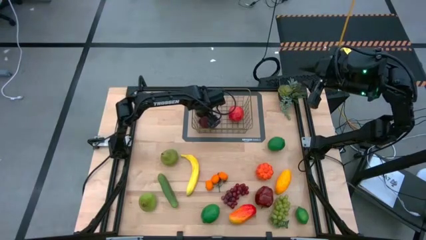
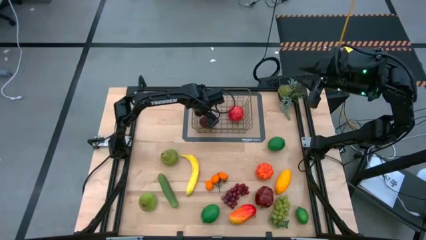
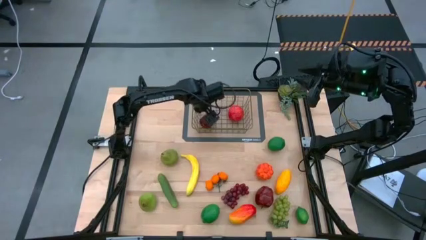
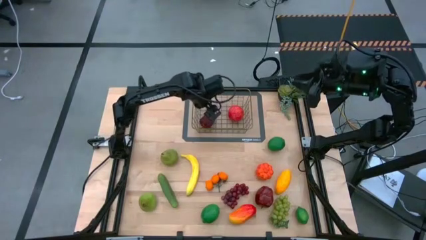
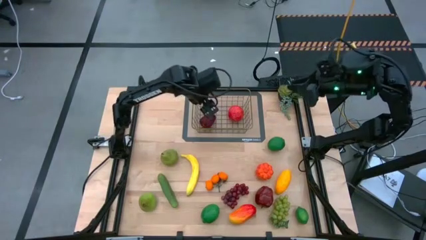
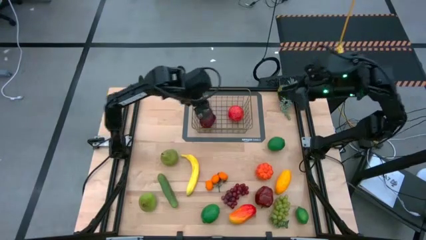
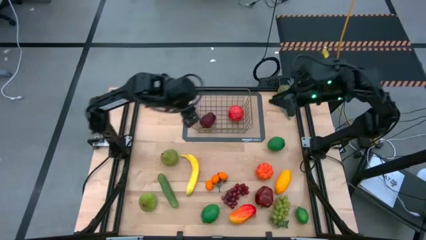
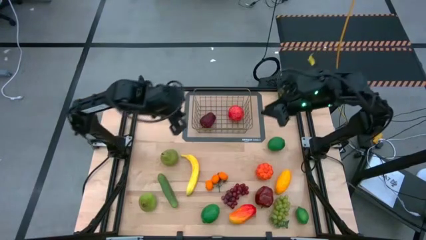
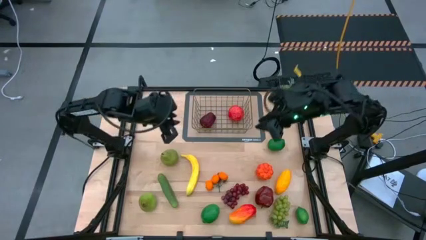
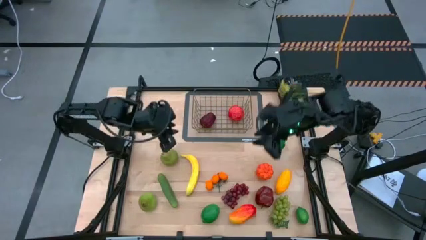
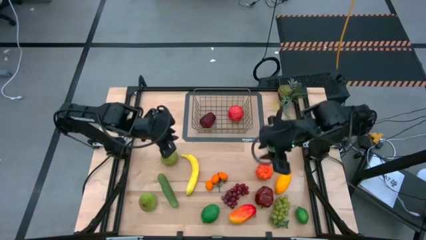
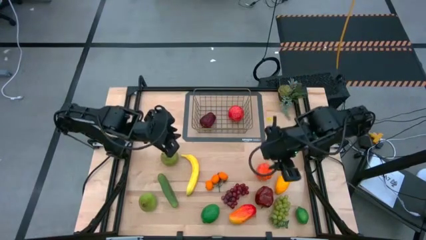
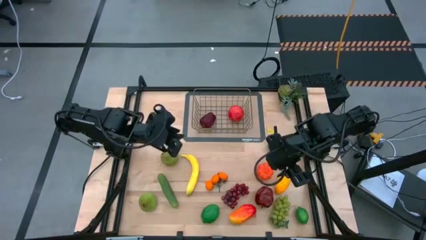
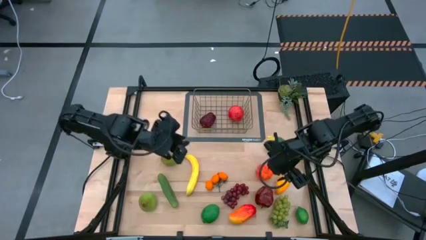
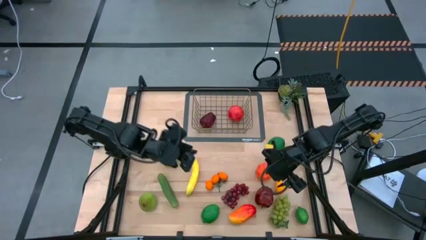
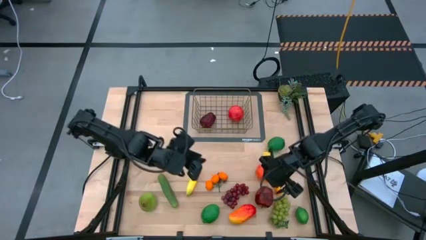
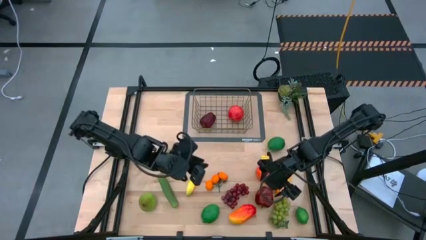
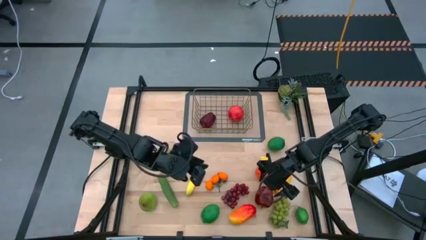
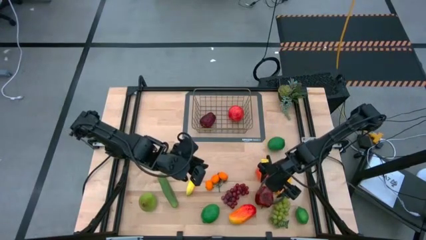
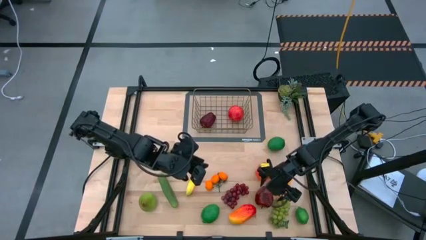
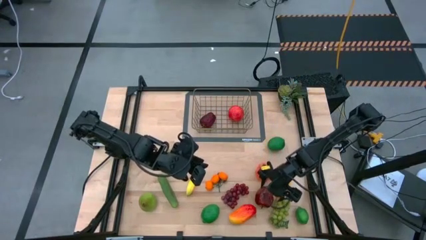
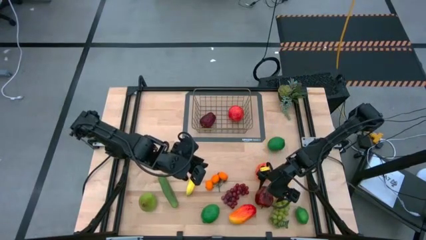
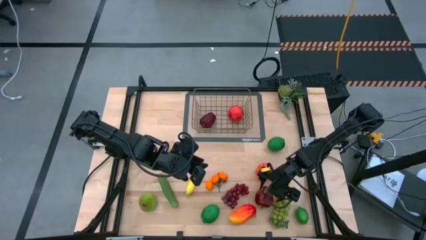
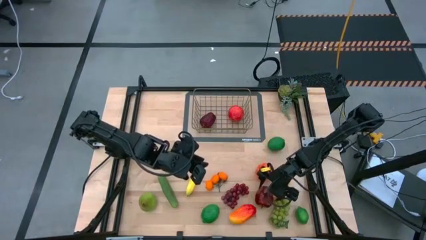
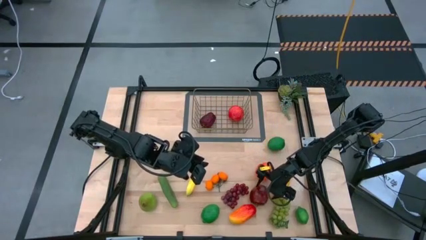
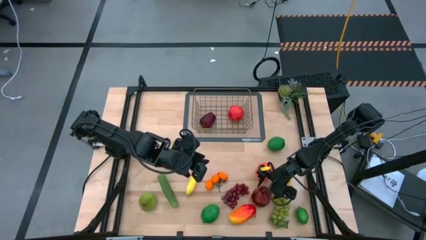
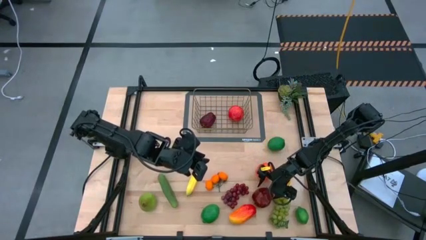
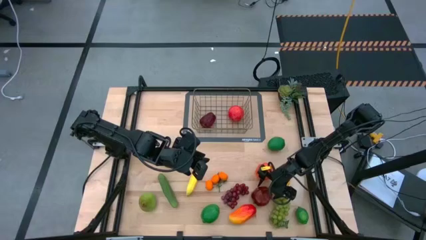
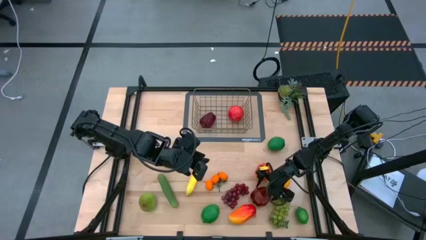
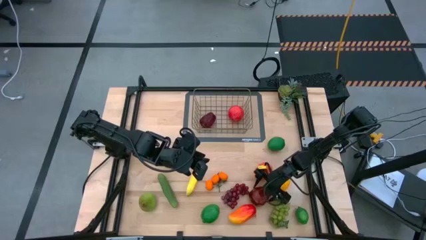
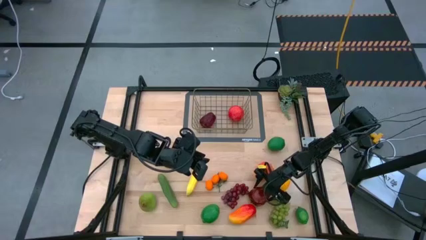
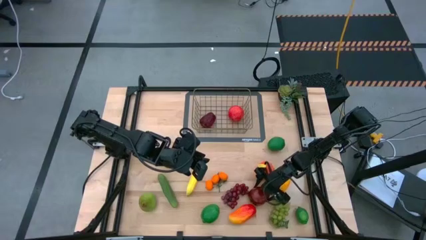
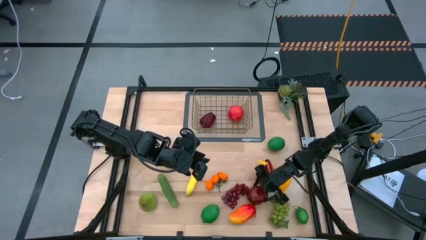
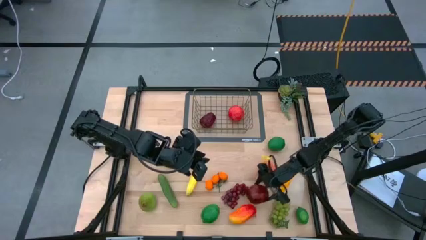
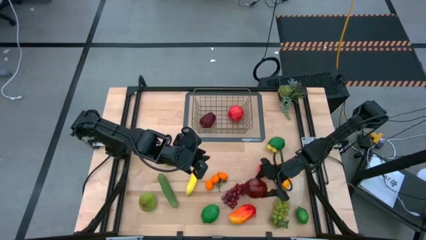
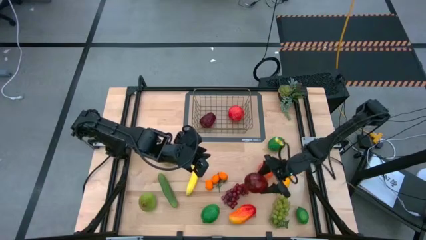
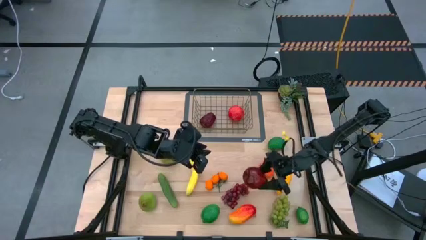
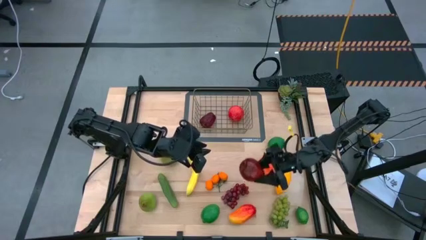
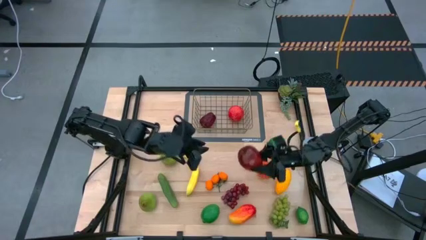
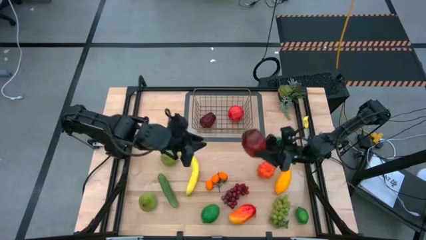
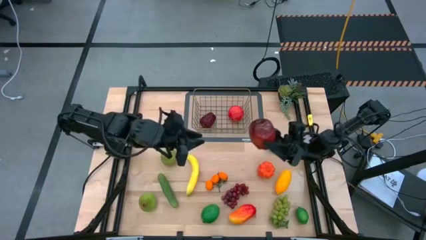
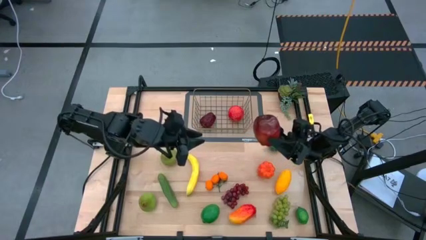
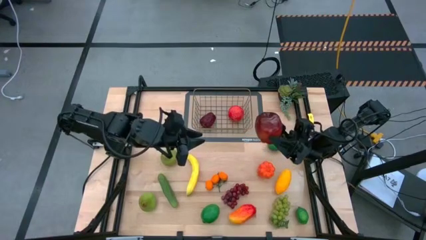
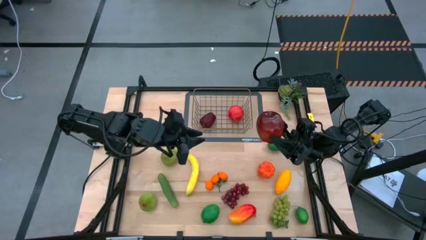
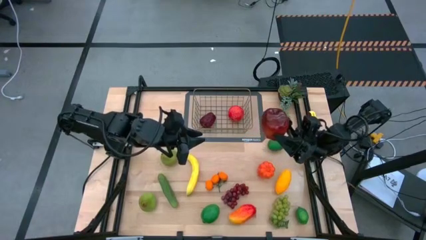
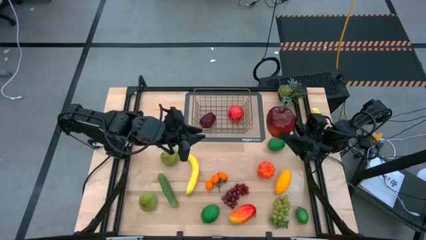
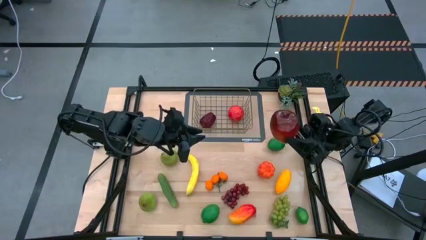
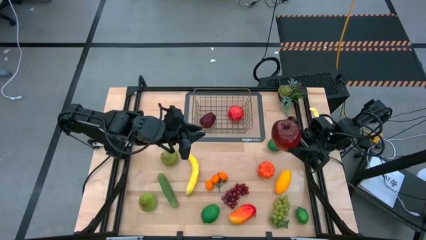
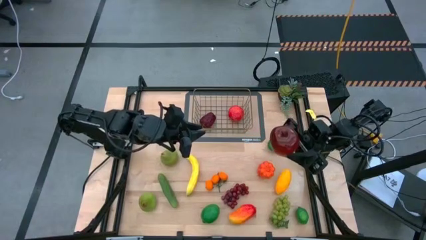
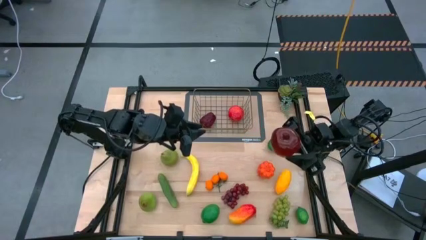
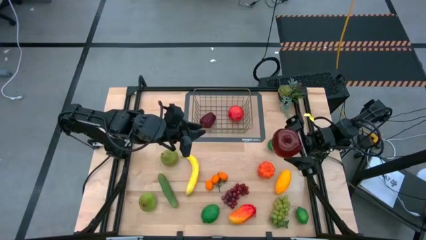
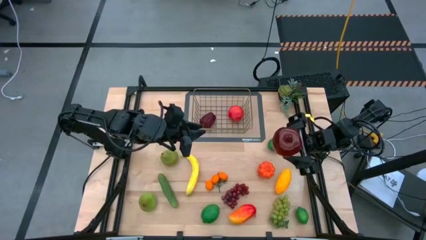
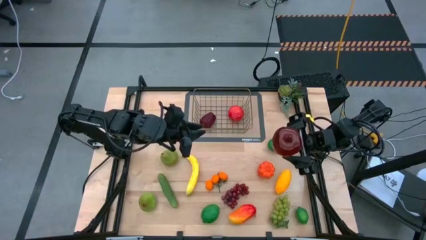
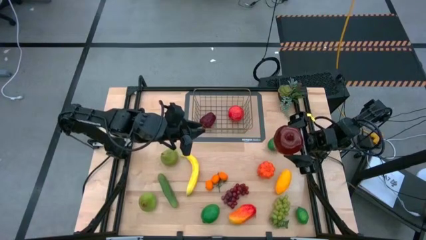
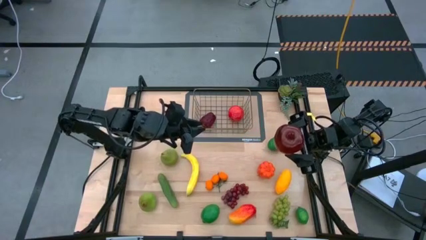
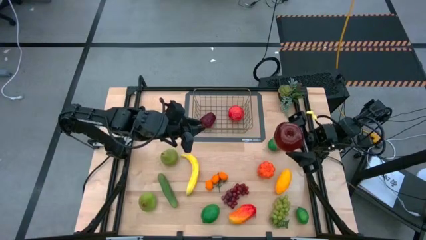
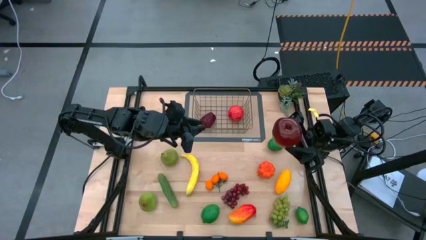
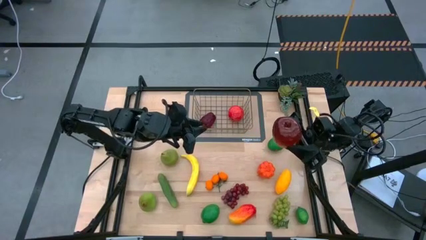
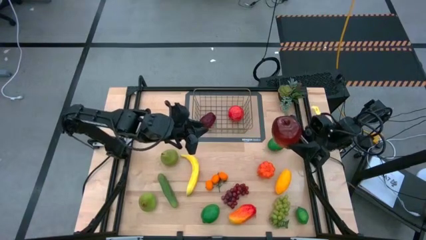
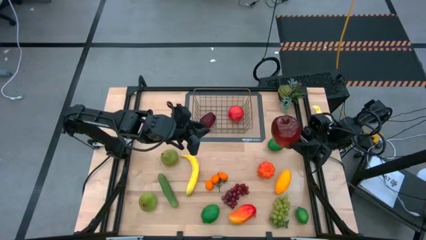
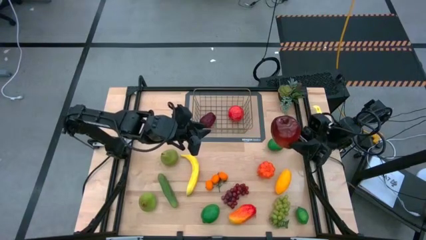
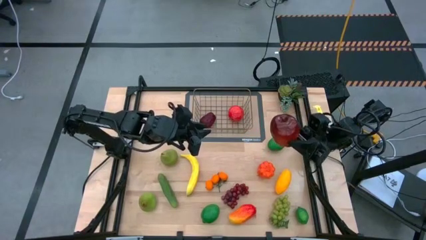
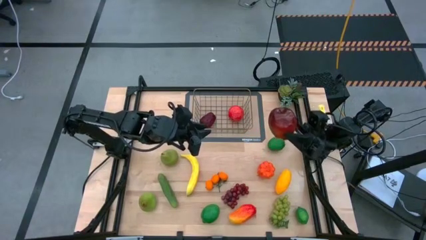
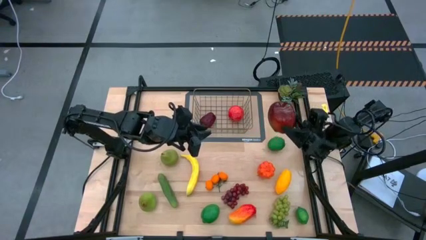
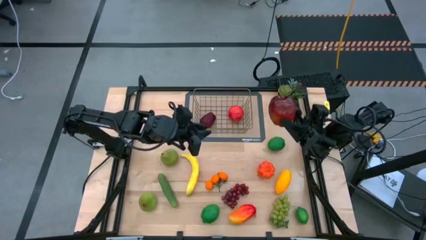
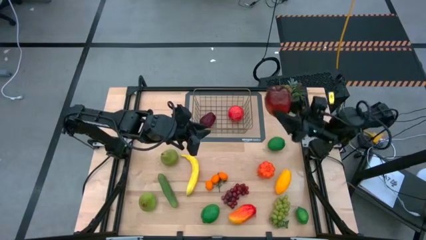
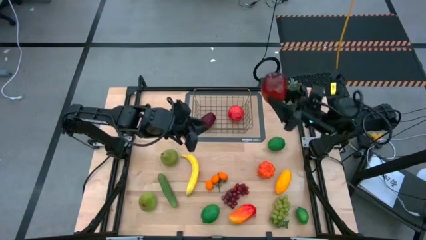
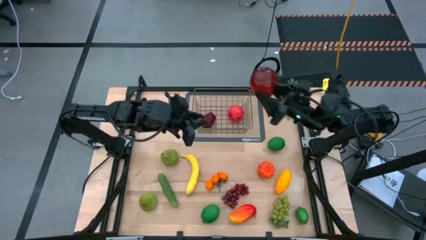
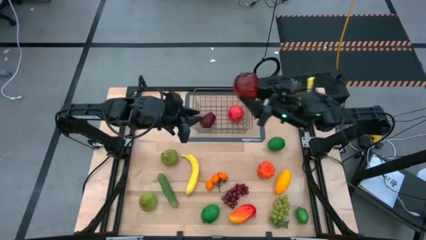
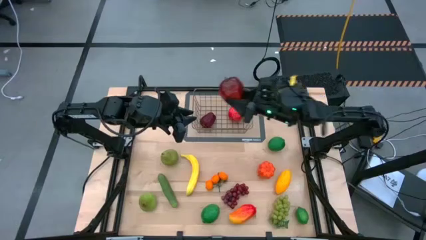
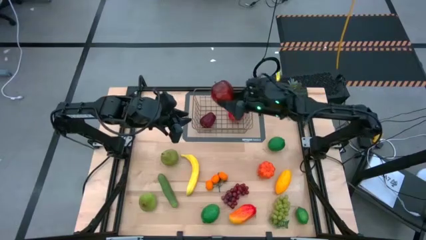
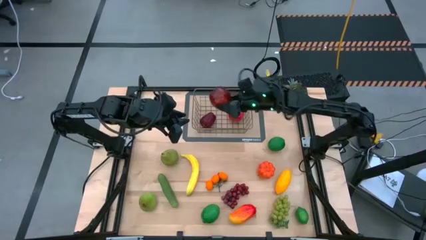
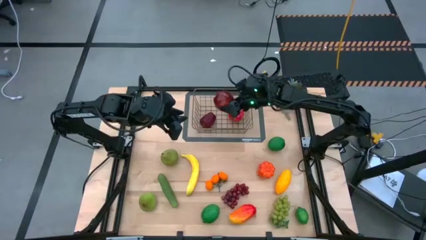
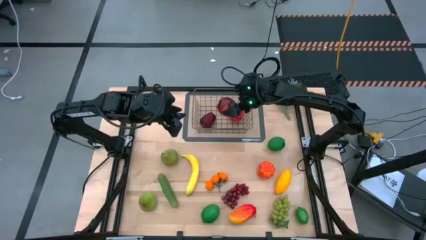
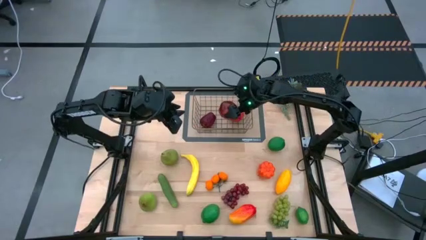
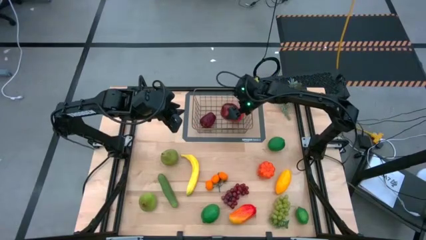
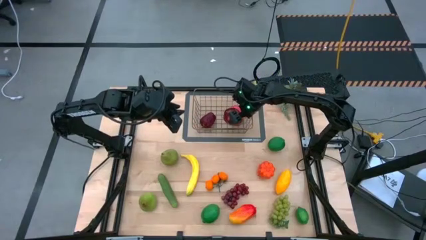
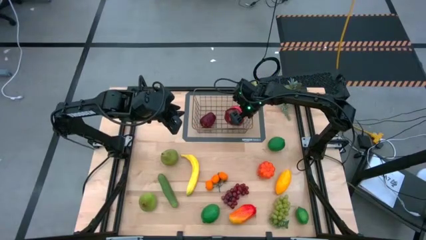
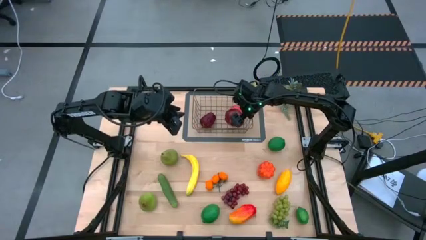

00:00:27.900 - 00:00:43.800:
Task: Build produce basket
Put the dark red apple into the brown wire basket

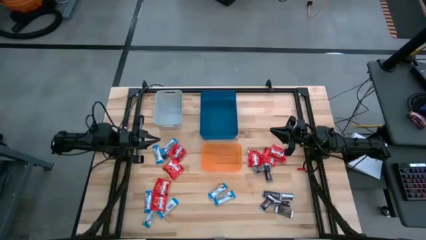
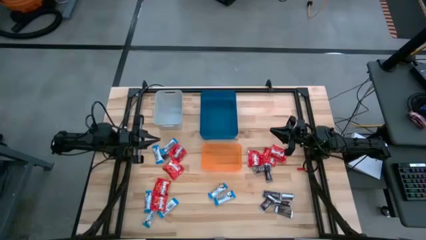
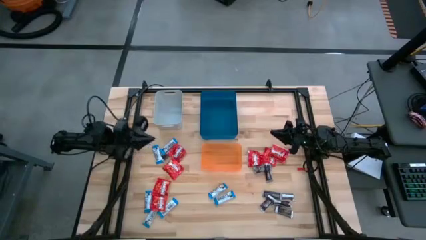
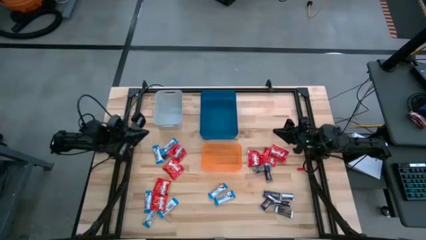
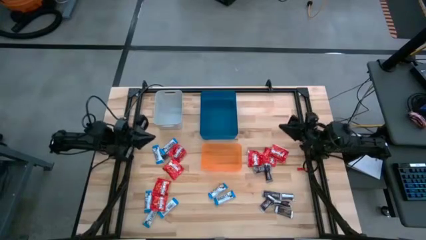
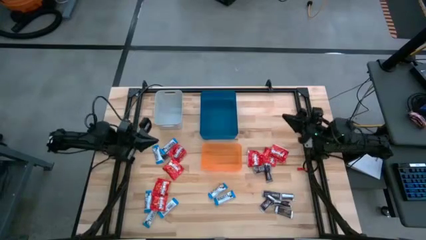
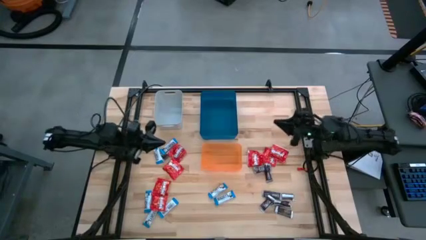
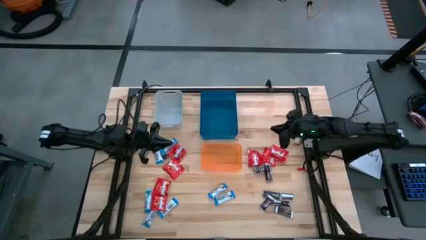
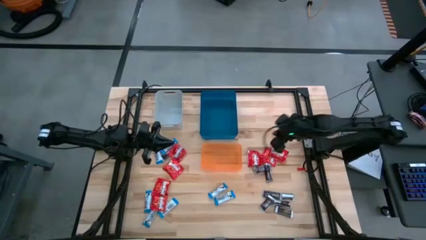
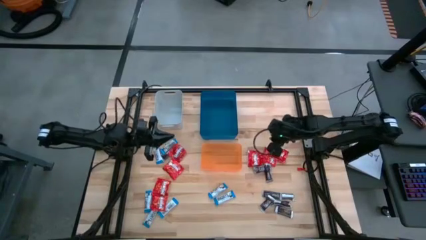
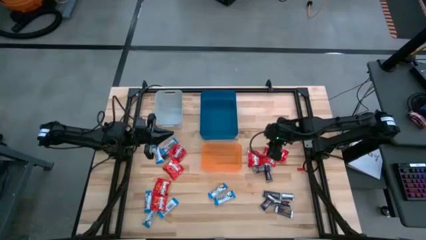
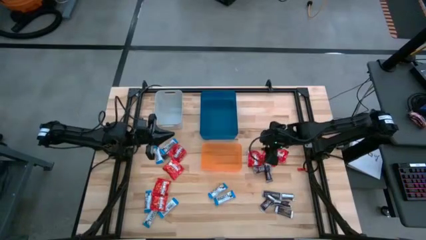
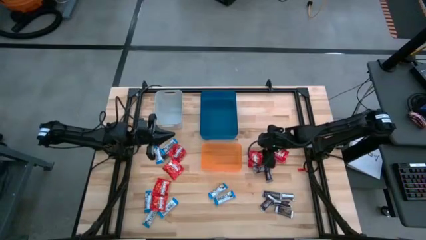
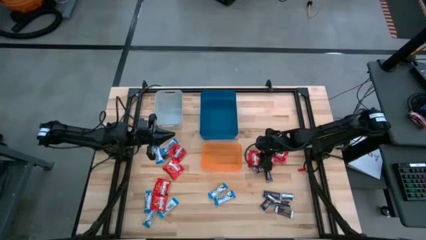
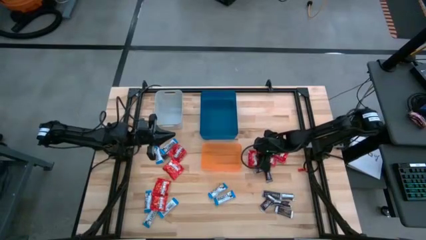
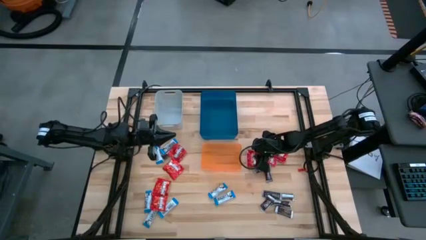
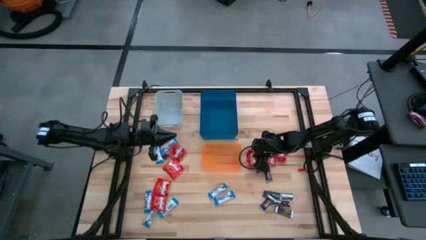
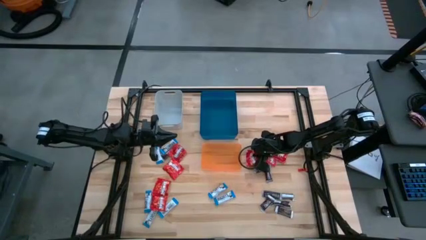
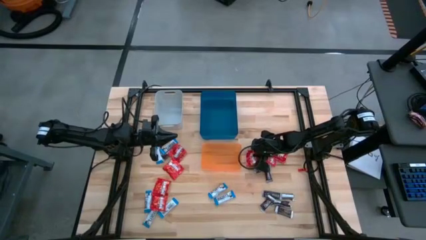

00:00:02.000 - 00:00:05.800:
Task: Sort candy
Put the red candy into the blue bin
